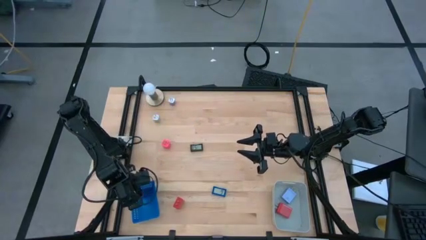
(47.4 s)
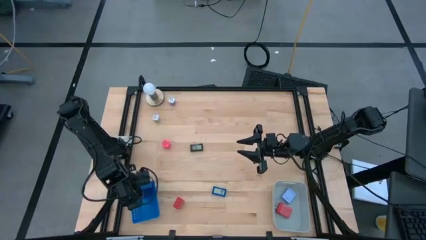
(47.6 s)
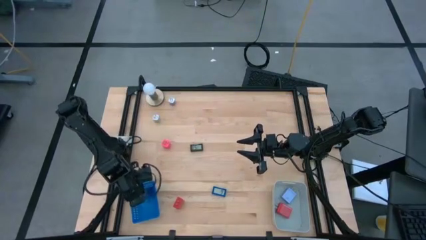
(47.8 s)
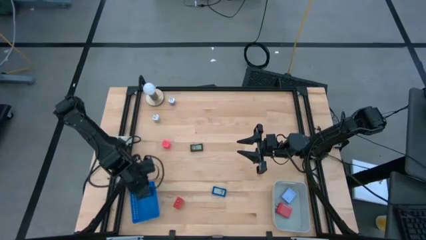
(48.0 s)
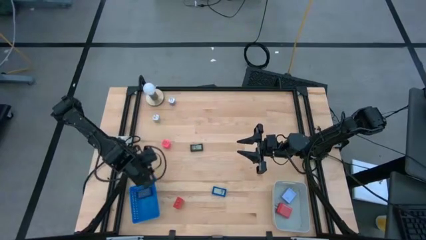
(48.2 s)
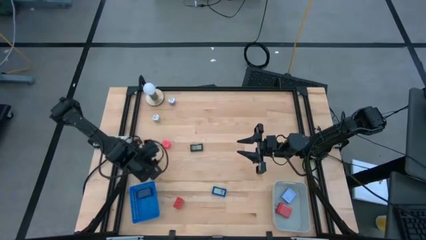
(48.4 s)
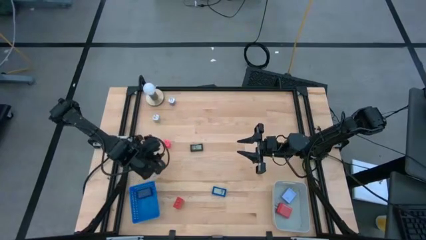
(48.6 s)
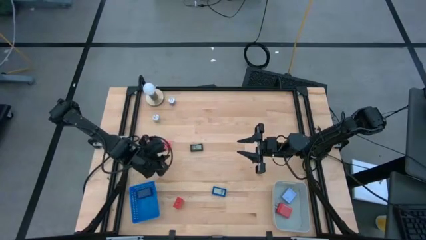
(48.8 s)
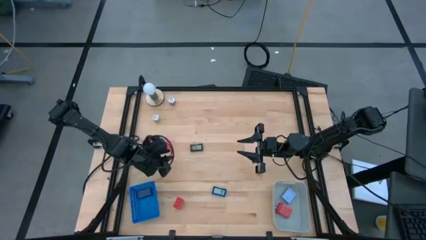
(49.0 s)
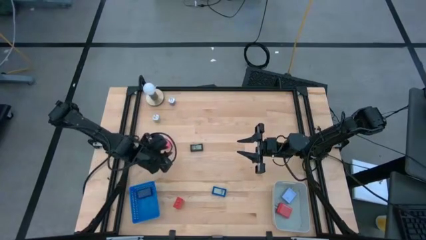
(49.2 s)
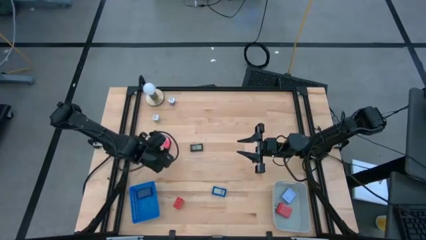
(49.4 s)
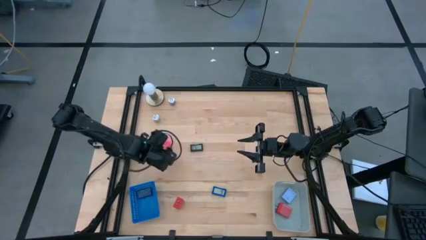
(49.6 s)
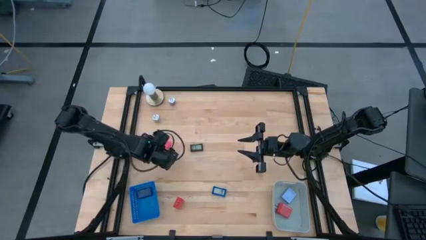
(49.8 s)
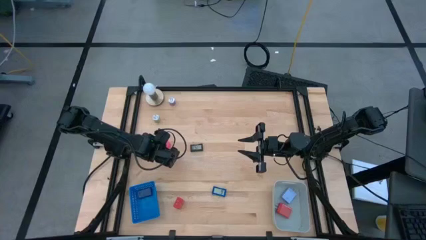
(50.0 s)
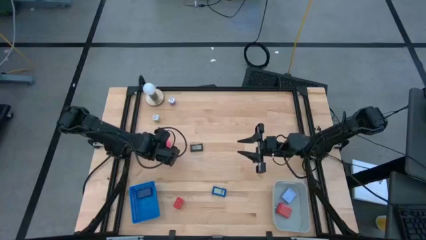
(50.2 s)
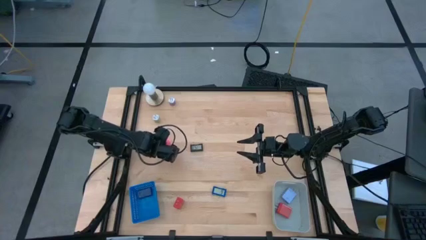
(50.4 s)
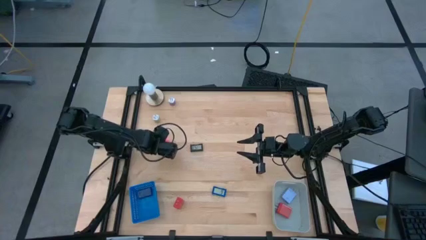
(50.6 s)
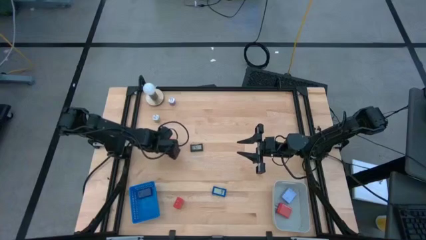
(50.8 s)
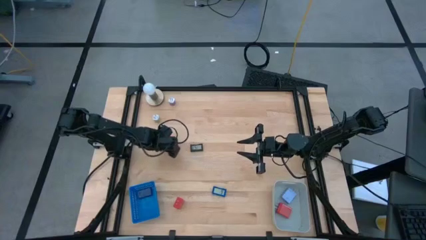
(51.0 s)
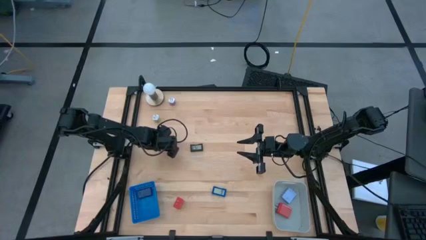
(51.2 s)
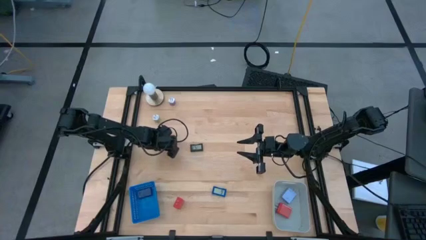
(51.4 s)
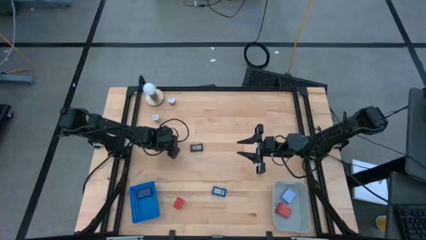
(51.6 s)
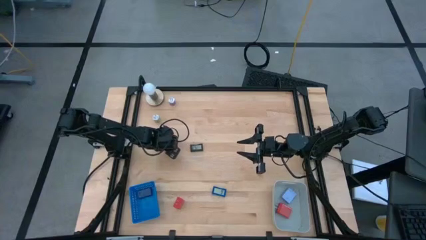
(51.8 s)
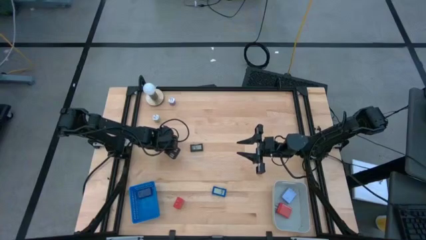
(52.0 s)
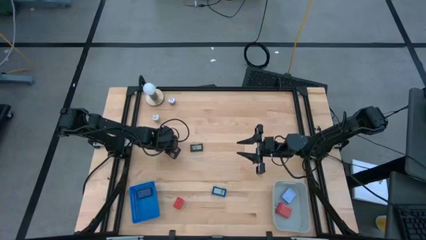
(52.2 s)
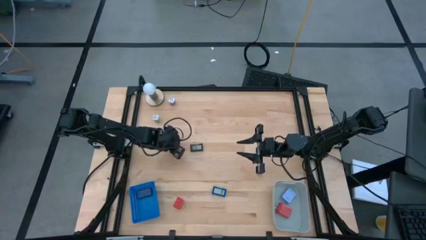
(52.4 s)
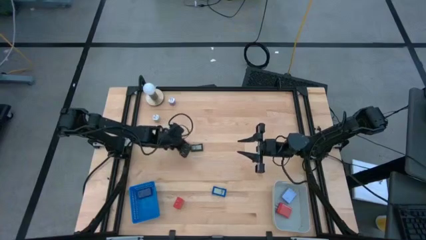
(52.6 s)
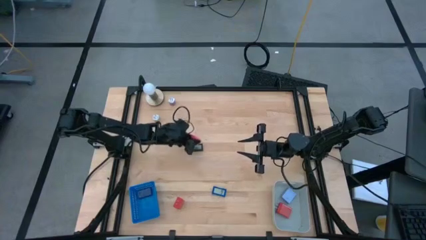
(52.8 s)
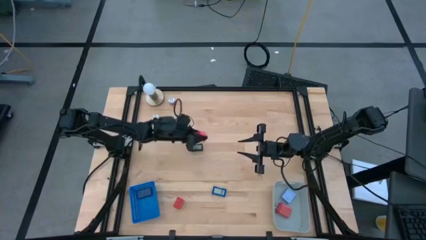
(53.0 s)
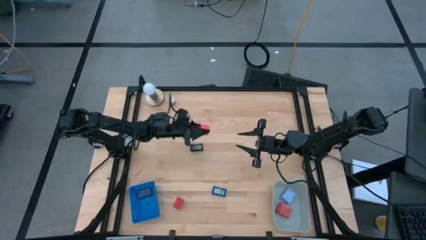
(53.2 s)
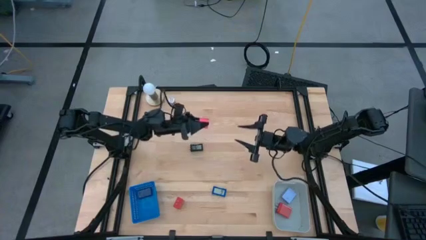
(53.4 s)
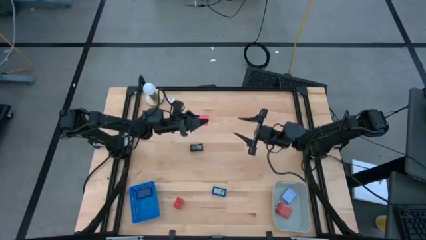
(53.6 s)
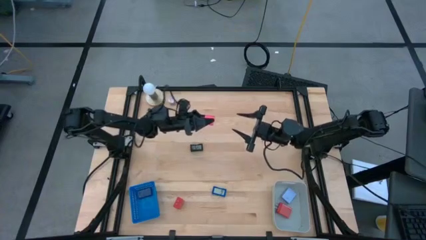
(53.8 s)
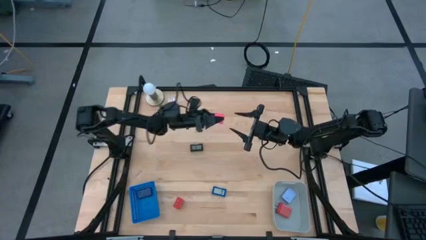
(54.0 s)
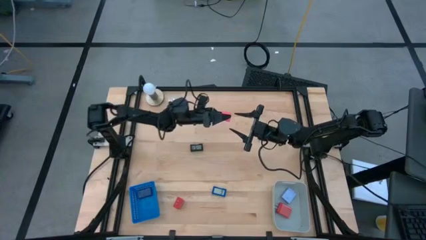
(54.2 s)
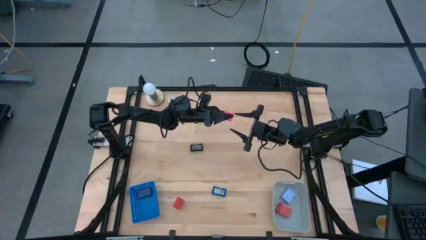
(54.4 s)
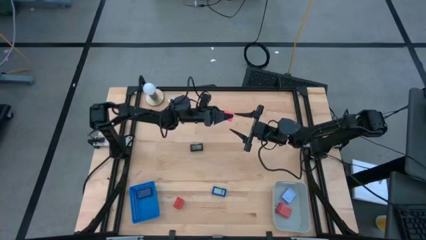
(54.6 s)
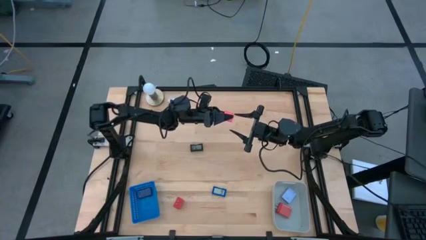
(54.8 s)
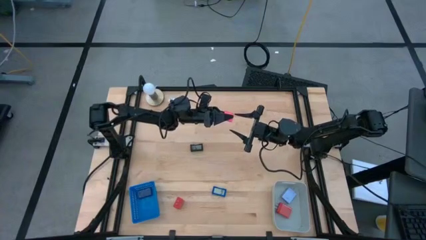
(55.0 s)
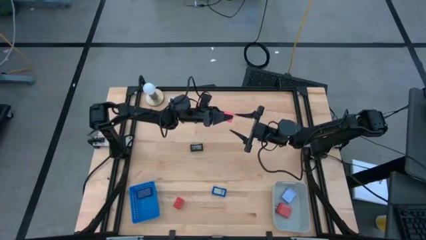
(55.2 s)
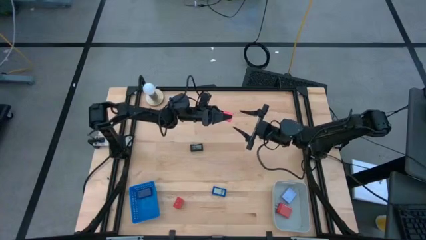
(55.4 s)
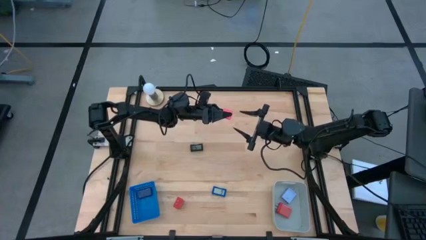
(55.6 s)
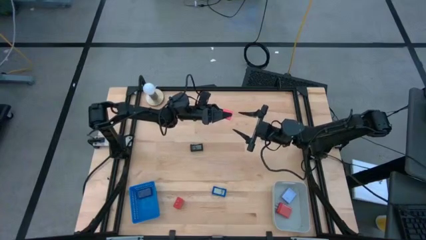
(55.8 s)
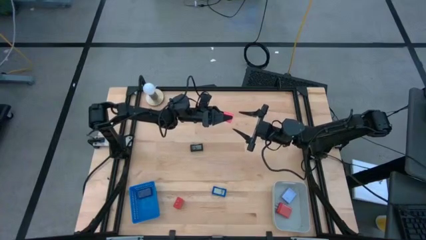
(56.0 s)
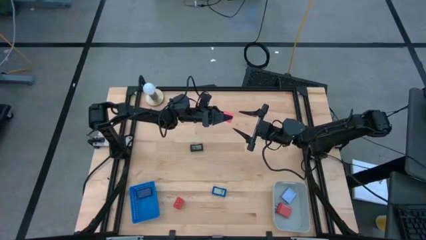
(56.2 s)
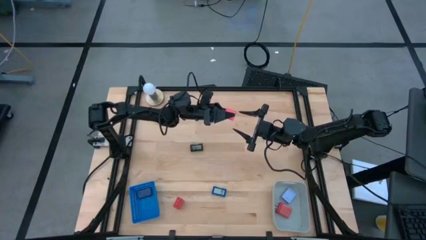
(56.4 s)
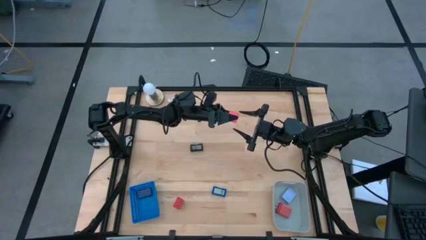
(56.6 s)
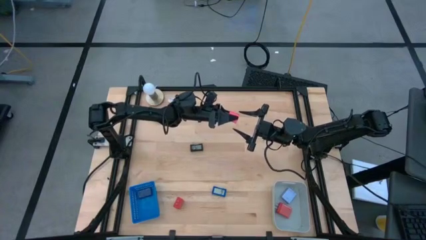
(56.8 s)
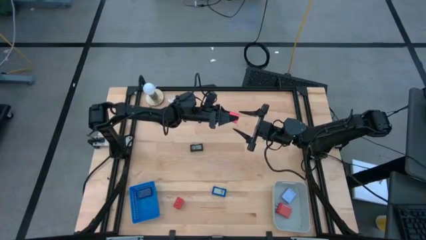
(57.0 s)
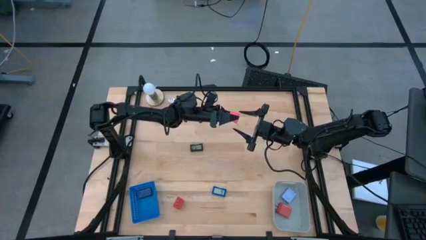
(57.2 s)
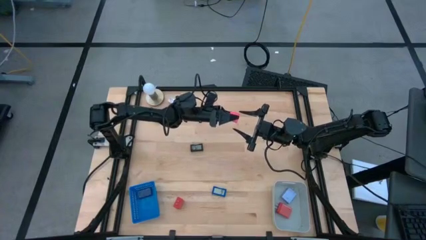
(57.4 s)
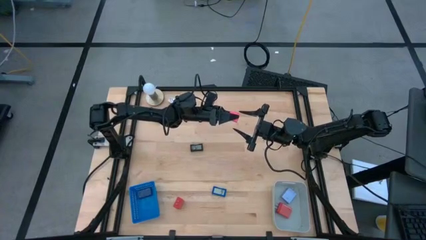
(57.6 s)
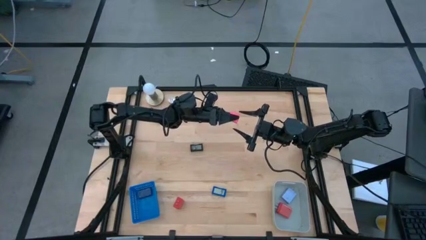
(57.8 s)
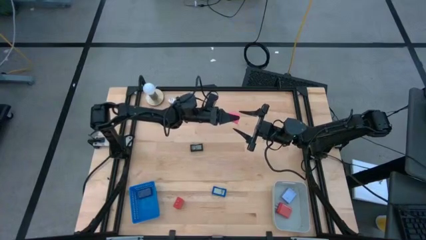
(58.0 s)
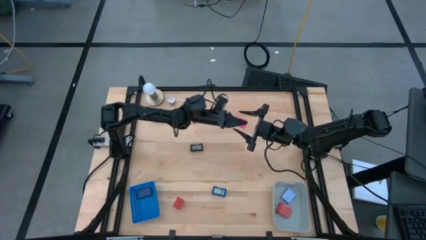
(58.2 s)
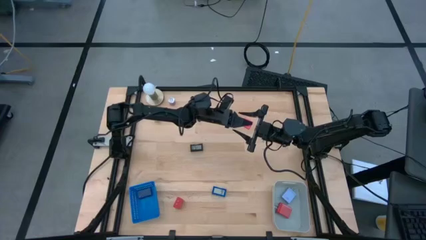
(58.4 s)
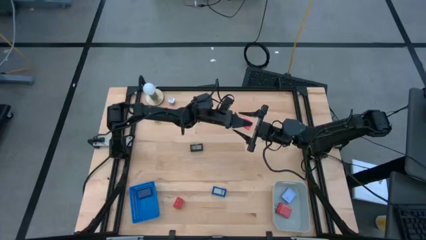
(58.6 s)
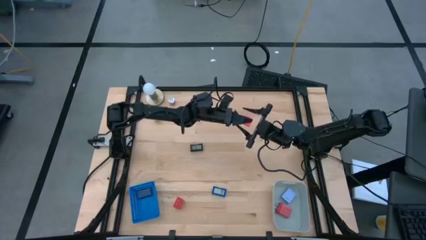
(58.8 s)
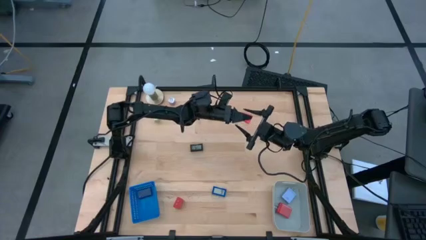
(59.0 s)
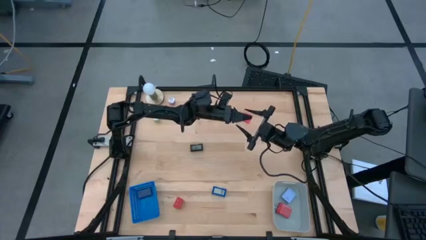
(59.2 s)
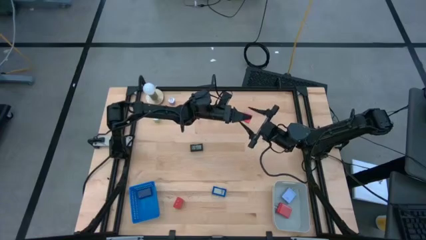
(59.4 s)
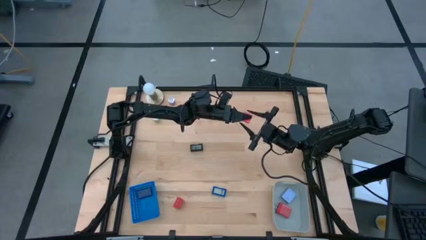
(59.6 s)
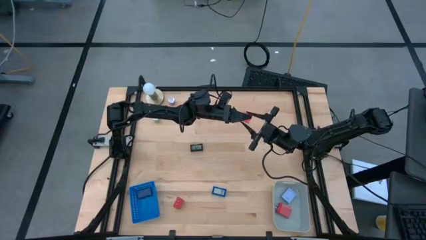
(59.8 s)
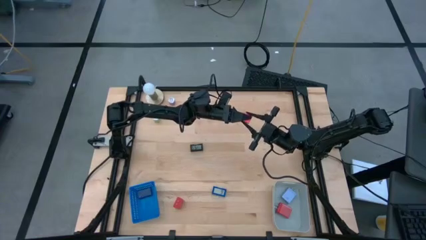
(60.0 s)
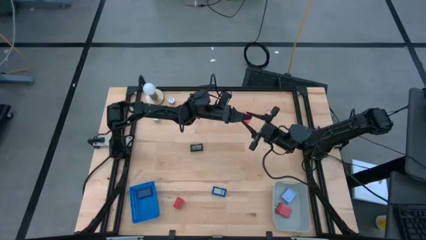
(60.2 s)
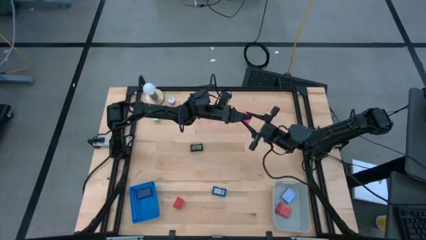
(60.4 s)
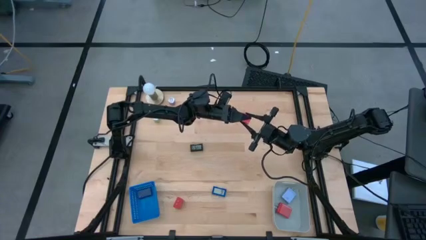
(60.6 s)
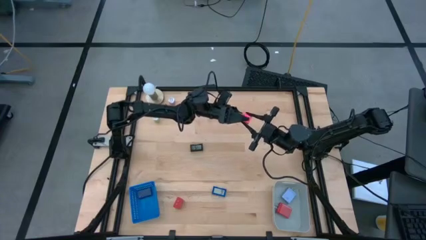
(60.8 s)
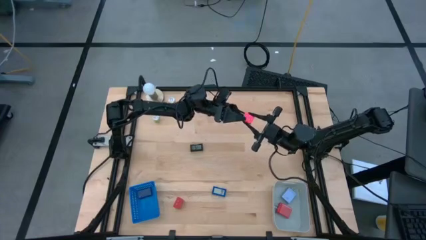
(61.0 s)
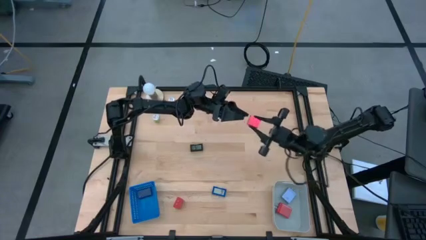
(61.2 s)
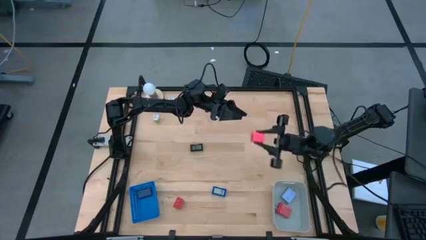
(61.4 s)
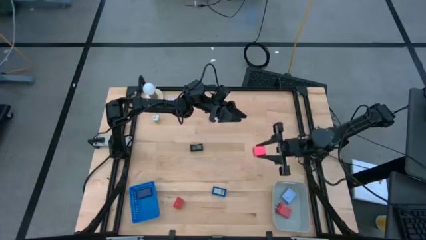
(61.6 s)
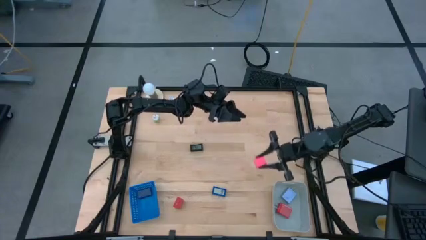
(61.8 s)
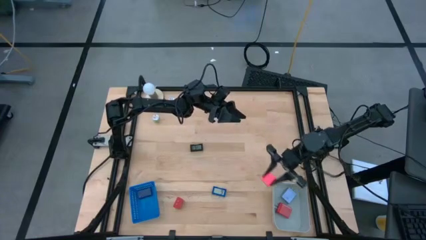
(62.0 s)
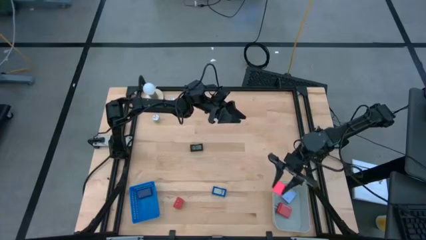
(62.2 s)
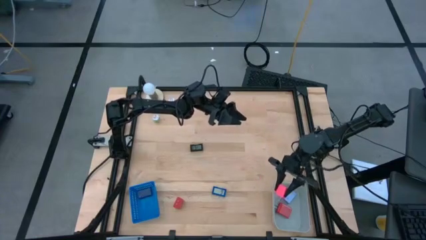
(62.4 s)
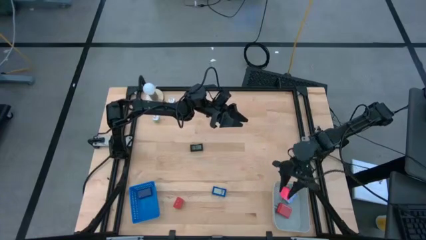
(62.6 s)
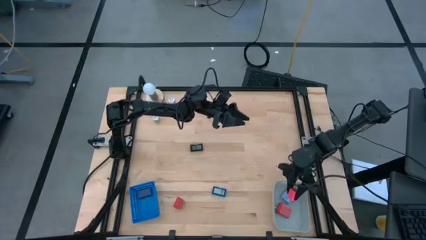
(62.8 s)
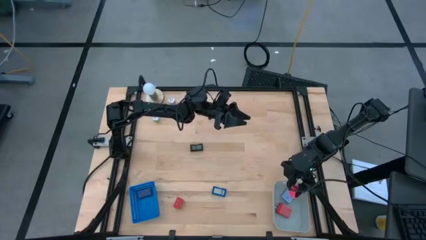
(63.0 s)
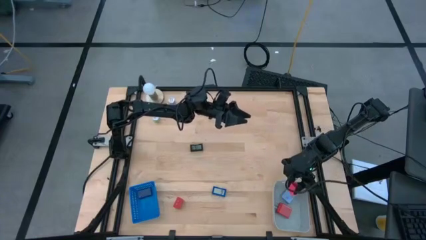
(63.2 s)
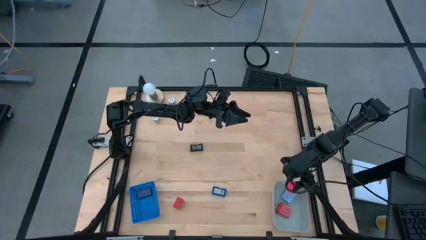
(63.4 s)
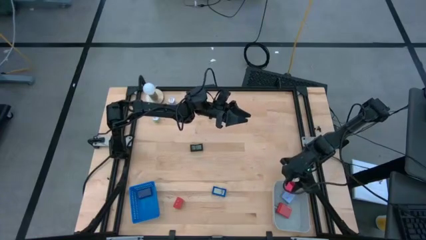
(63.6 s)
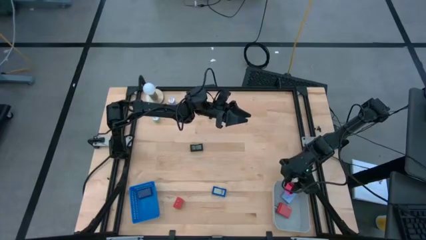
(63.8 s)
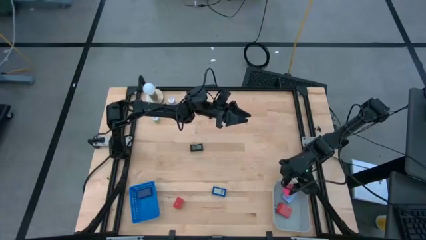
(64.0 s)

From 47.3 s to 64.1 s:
Task: Pick & Place Office items
Put the pink charger adapter into the gray bin
